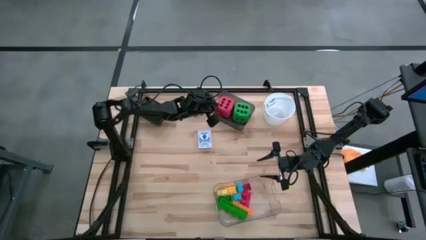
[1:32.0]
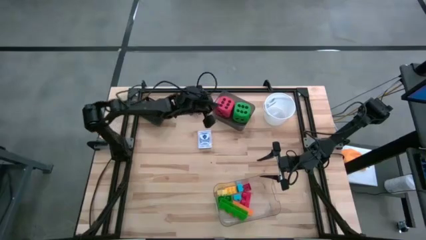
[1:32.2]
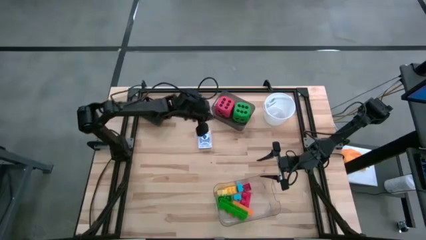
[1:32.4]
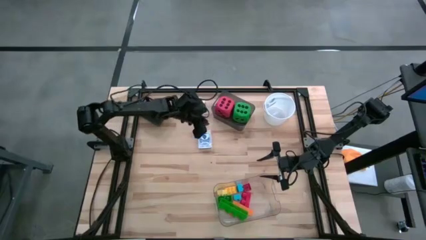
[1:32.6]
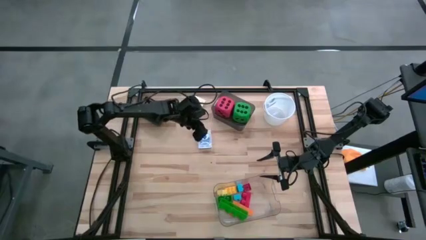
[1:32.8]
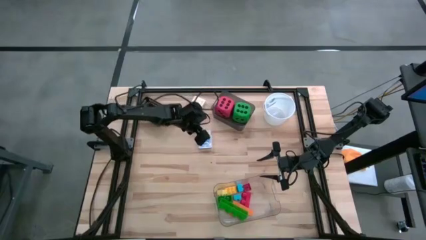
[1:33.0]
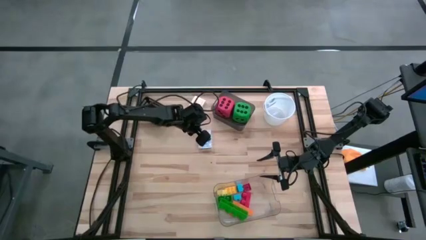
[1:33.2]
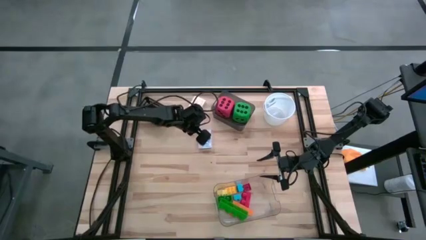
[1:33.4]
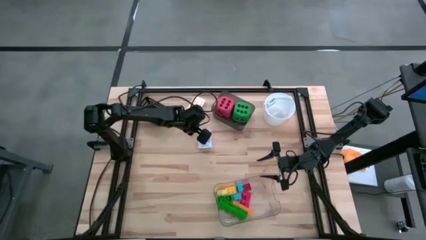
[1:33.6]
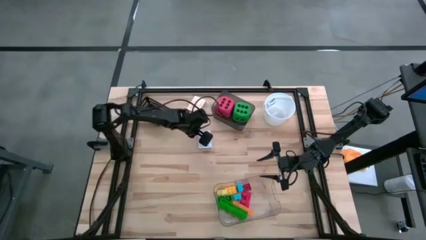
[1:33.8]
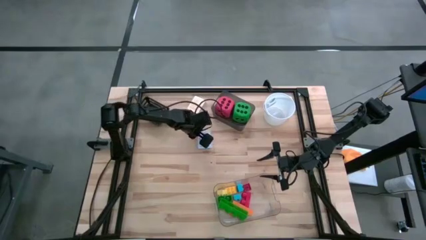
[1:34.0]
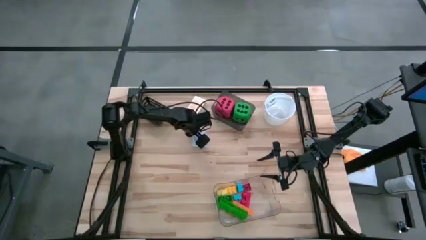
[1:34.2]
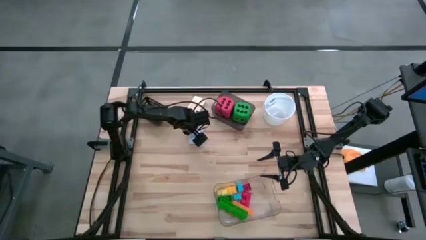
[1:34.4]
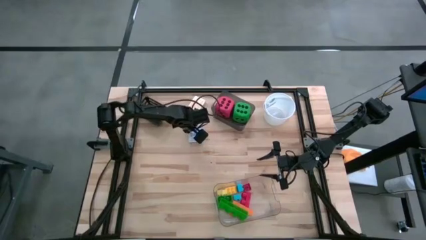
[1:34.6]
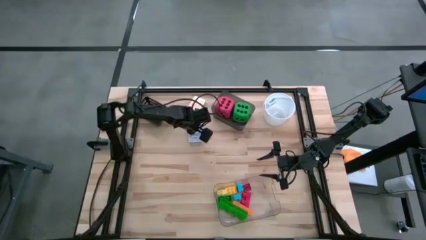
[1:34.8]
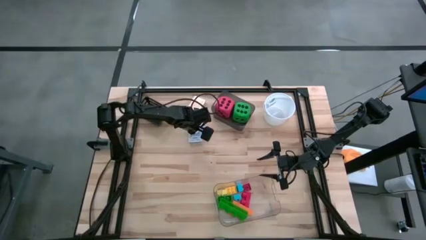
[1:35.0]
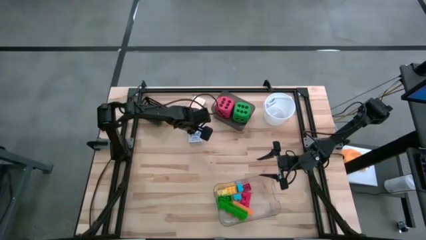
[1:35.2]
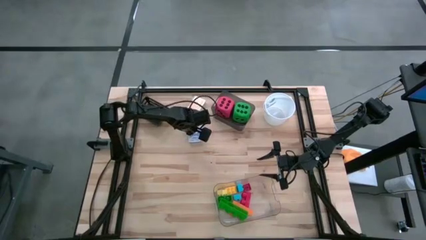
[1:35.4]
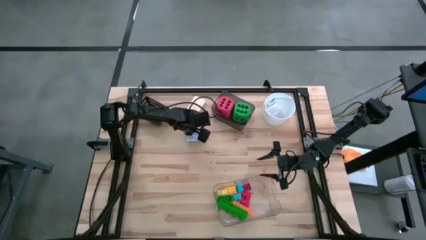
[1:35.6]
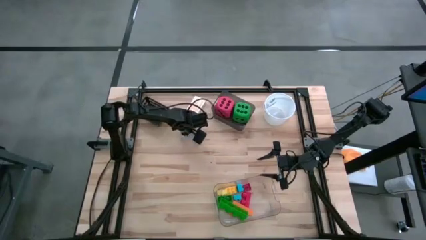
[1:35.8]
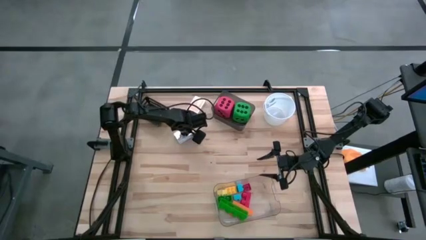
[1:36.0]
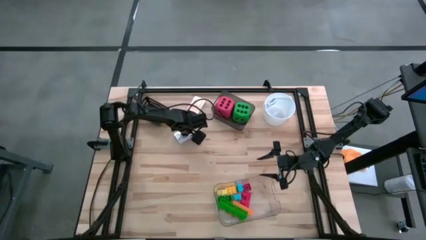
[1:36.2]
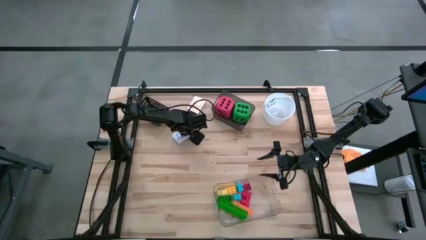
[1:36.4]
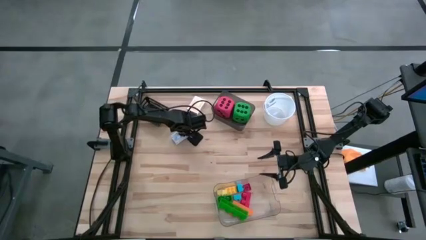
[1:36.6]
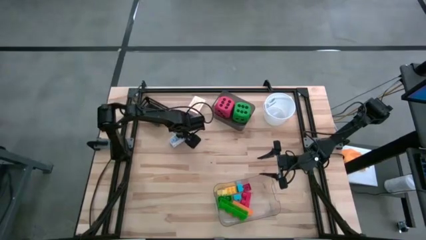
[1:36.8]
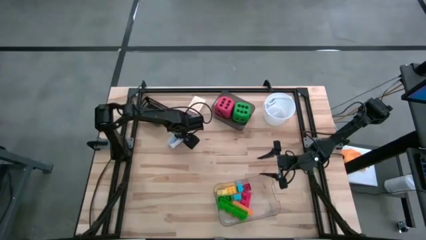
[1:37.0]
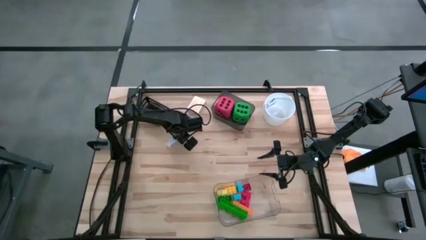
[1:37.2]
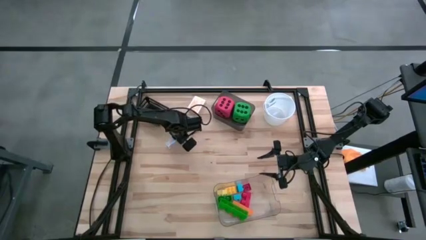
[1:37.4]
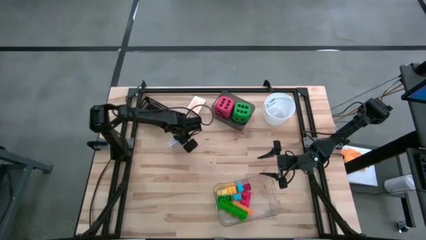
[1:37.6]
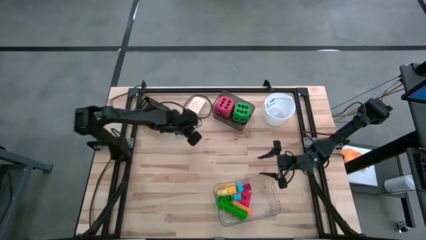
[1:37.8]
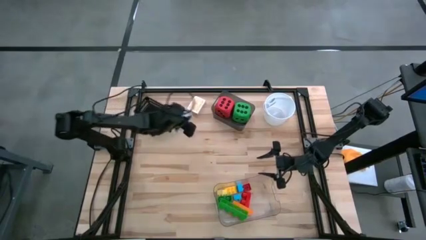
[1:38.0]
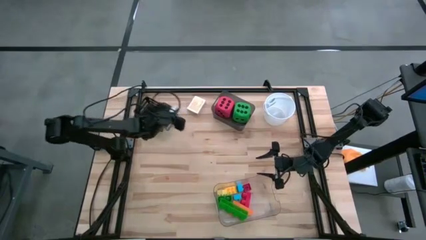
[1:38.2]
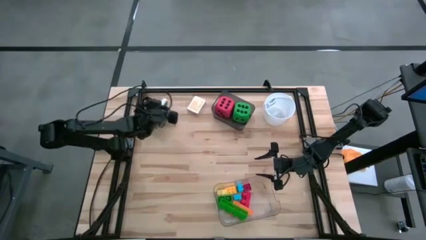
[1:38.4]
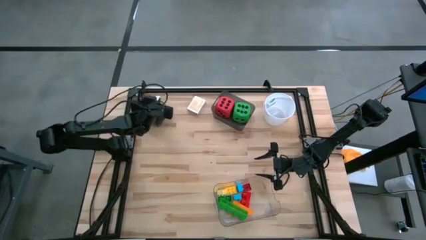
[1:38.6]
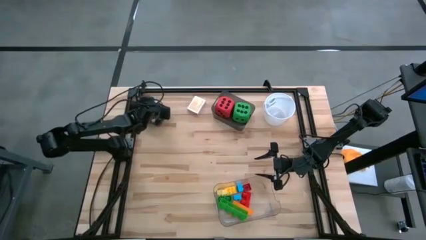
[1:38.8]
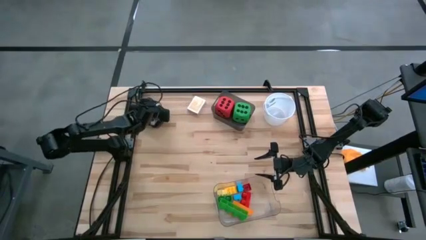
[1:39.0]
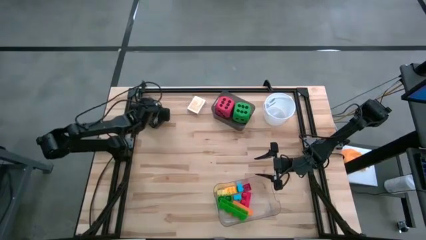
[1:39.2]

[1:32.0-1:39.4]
Task: Pick & Place Toys
Put the blue deck of cards into the top left black bin

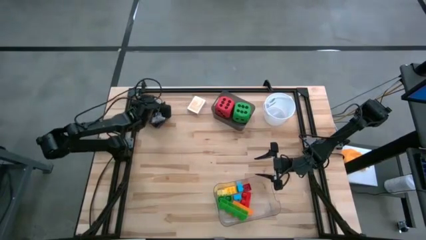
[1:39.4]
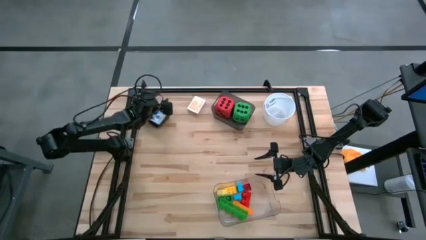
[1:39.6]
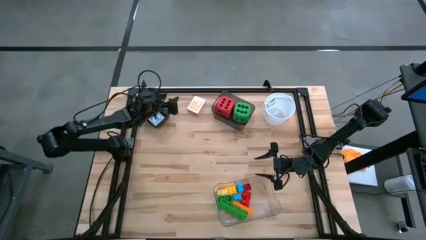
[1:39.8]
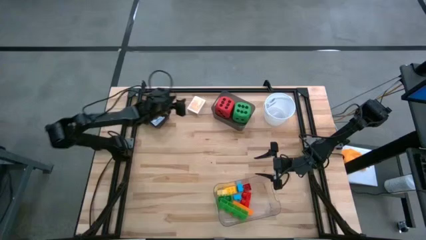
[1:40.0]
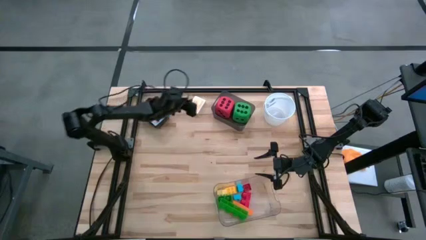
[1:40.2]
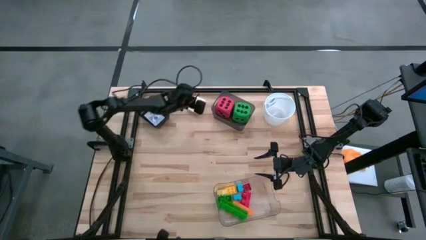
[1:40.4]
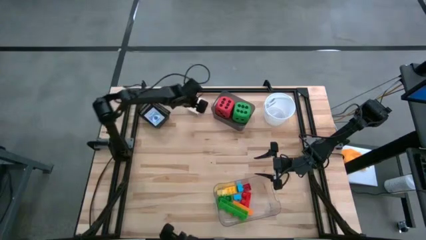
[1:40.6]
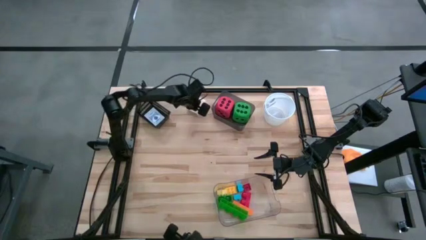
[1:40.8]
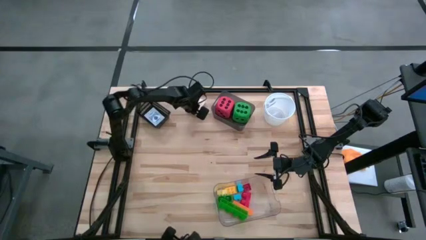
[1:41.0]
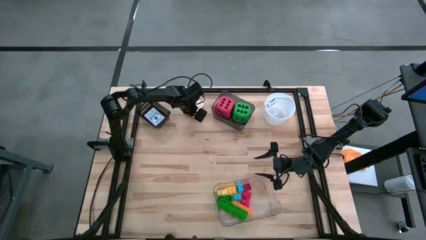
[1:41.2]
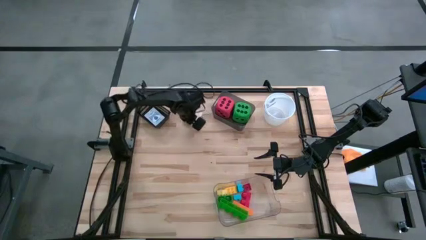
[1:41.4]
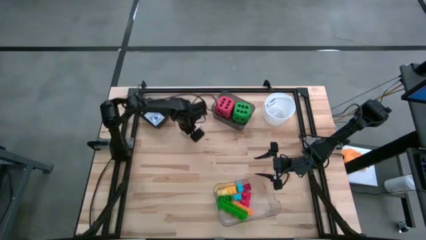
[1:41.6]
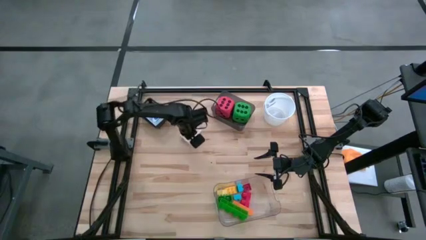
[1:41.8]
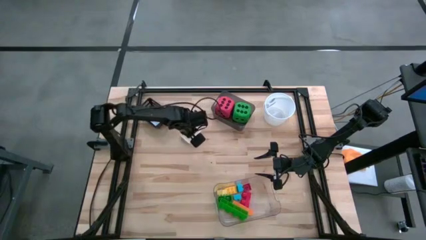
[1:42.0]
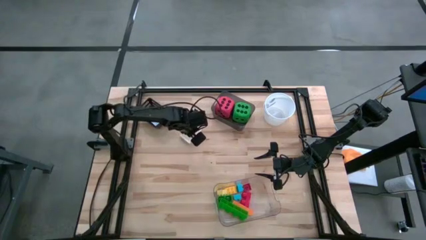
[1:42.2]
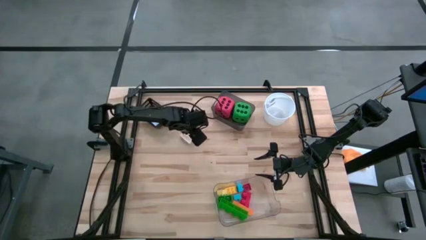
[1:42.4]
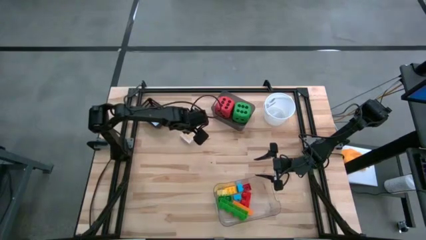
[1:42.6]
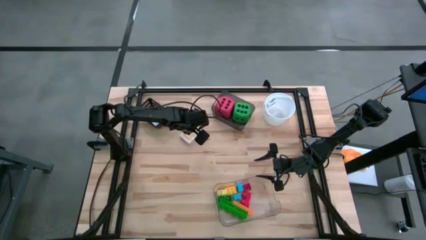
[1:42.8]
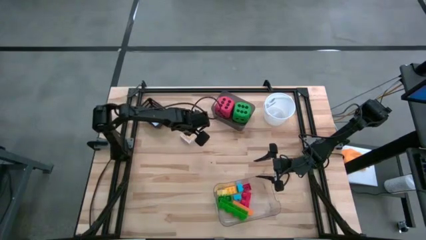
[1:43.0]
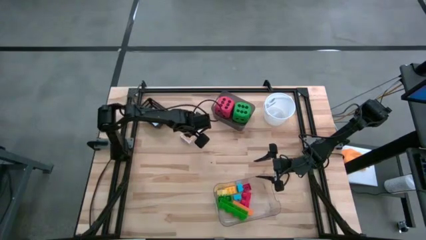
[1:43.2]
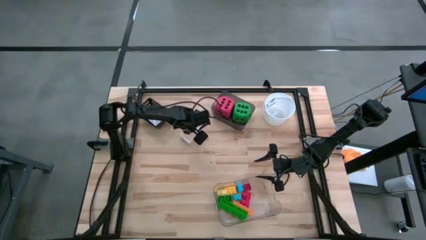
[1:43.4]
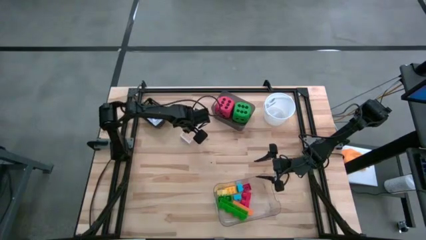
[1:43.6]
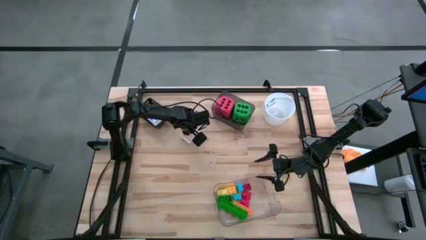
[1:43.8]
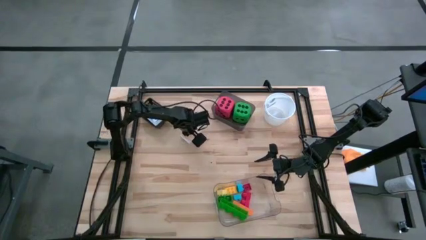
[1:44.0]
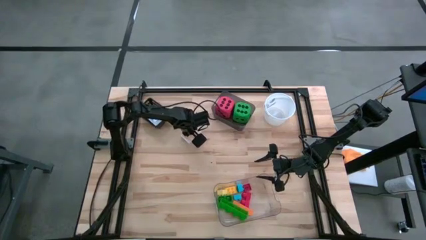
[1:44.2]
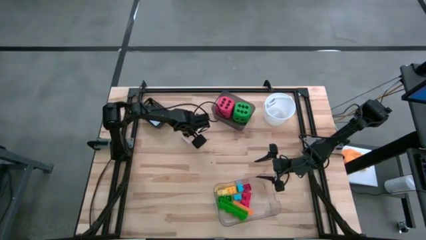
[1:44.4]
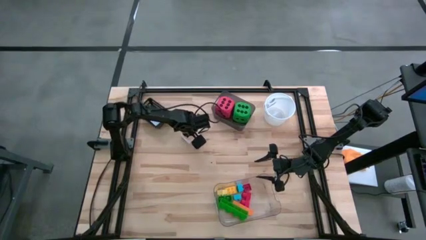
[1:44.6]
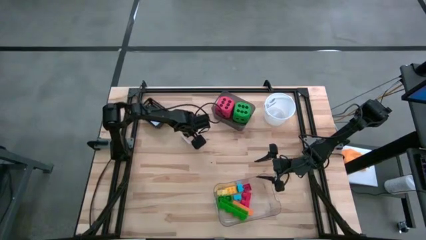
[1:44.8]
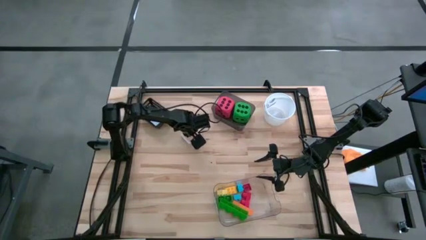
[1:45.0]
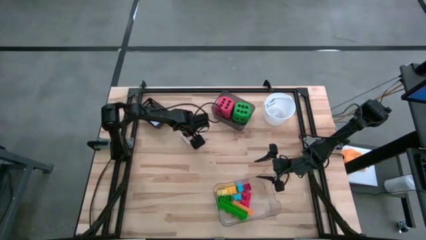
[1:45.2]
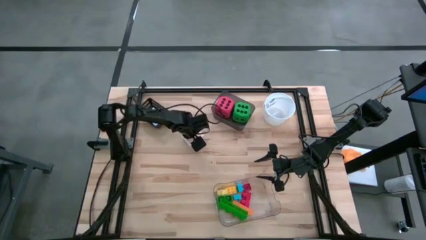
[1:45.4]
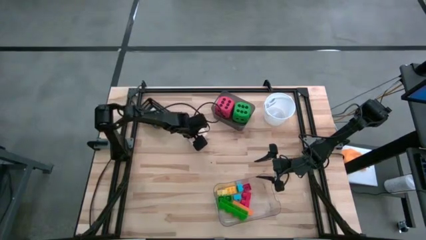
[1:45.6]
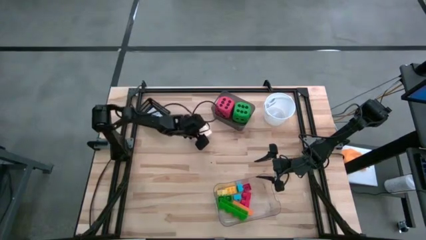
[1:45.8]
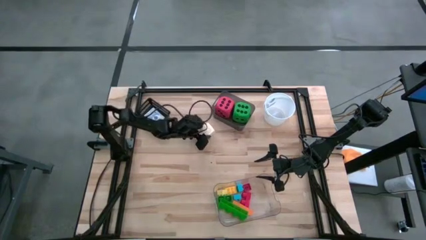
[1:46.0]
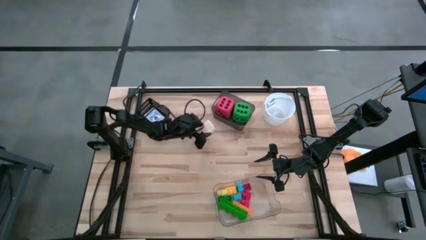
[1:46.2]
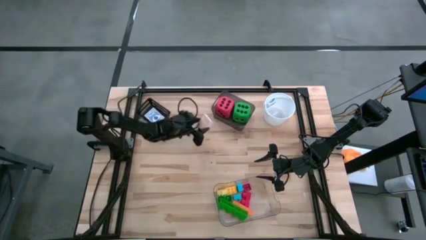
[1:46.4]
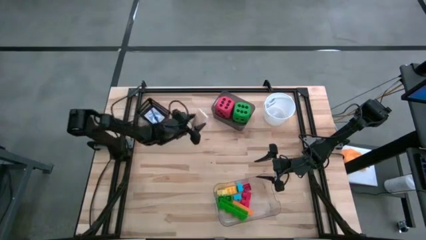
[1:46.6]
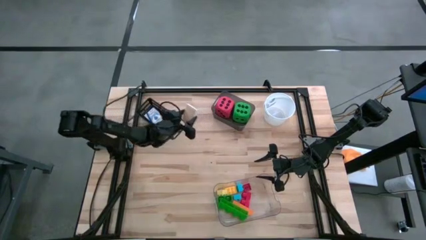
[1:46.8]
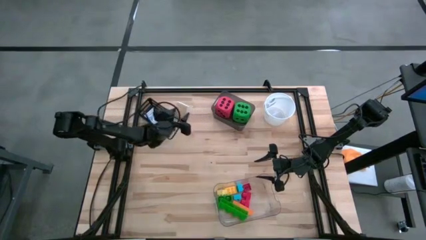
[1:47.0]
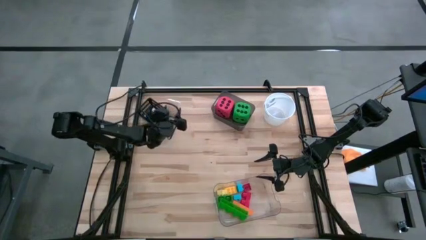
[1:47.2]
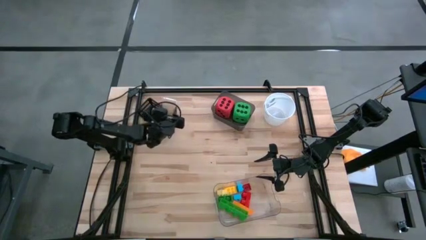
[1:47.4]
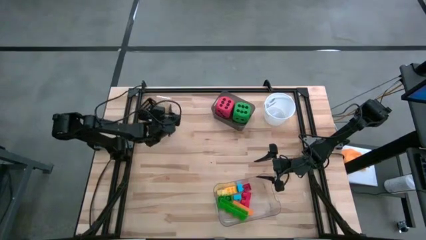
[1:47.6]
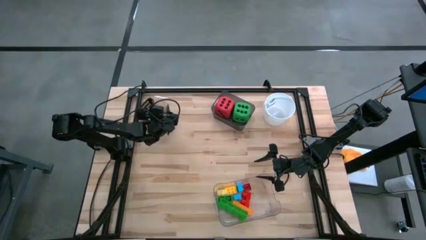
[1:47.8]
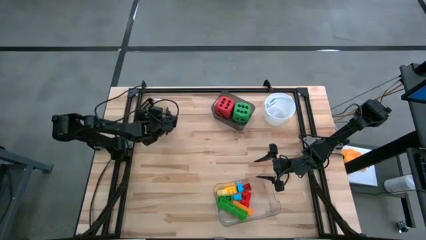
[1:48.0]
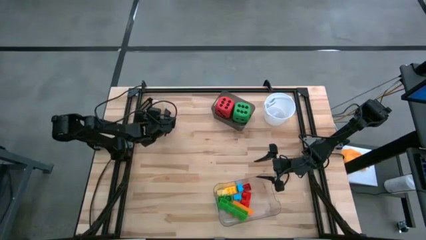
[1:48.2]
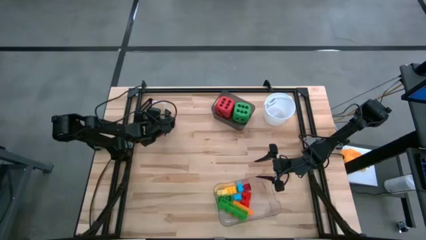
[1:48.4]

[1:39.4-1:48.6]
Put the yellow deck of cards into the top left black bin
